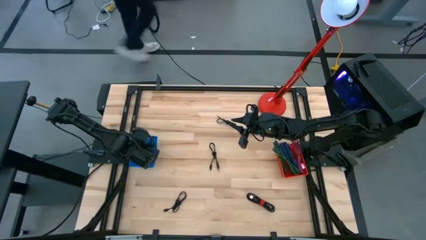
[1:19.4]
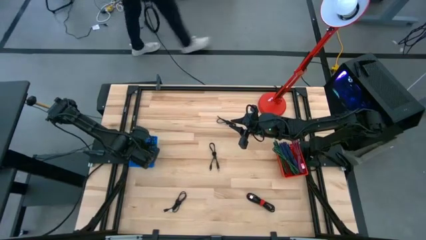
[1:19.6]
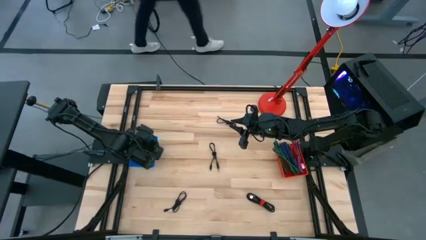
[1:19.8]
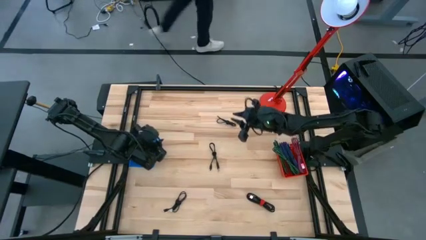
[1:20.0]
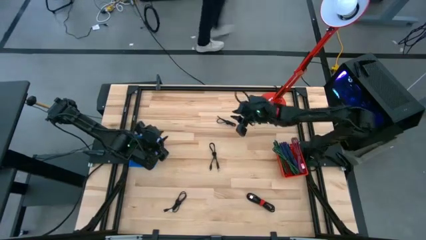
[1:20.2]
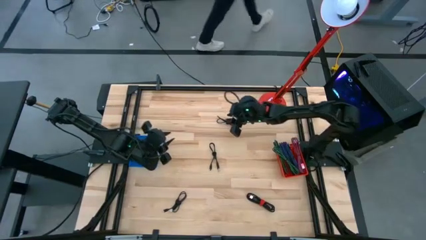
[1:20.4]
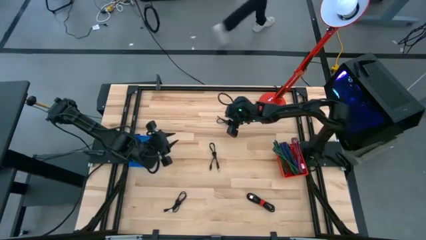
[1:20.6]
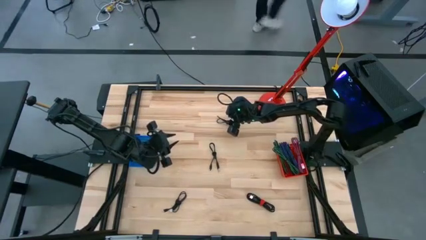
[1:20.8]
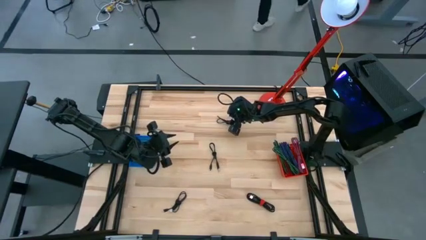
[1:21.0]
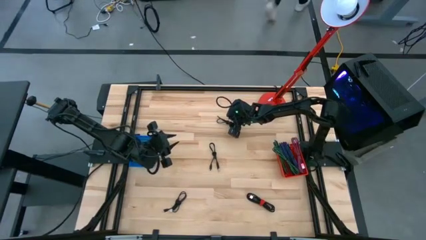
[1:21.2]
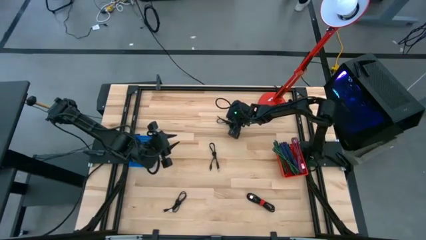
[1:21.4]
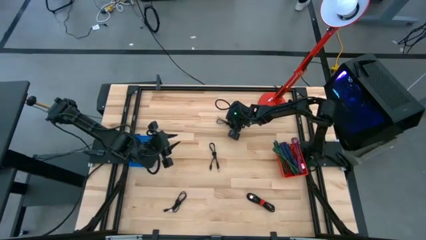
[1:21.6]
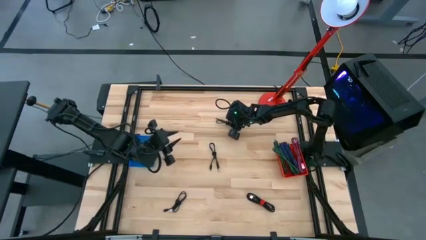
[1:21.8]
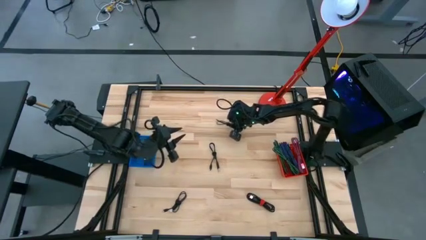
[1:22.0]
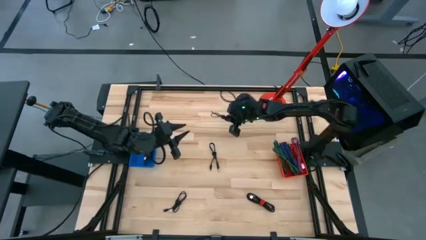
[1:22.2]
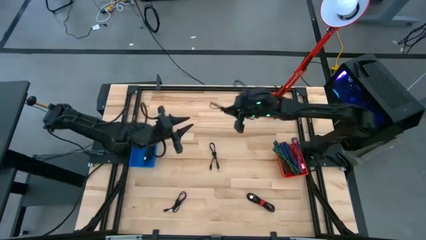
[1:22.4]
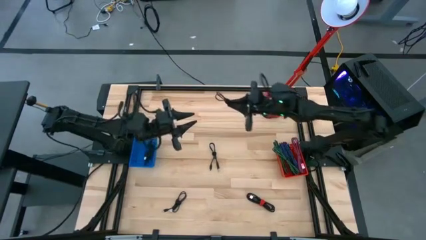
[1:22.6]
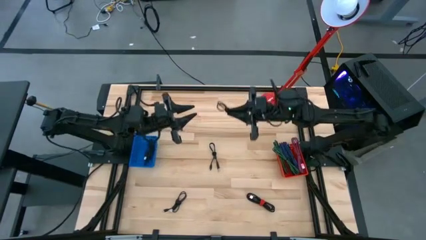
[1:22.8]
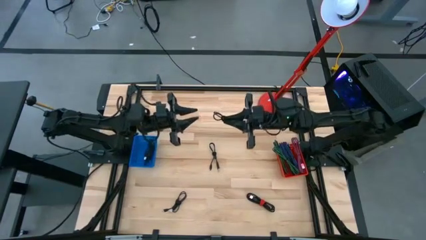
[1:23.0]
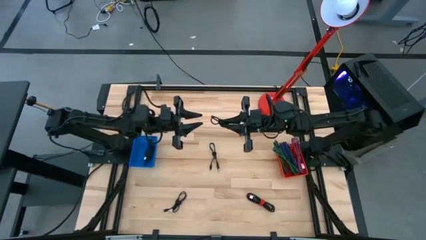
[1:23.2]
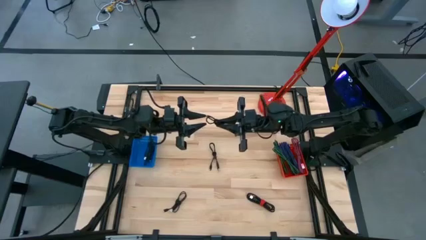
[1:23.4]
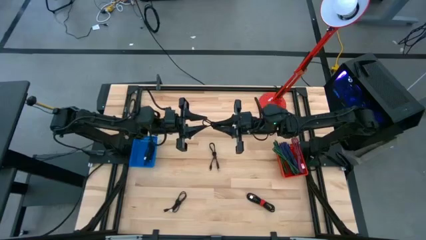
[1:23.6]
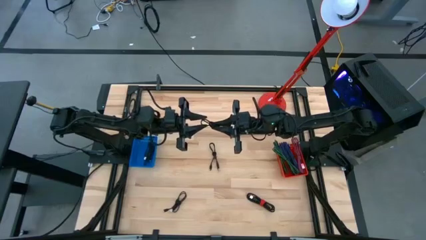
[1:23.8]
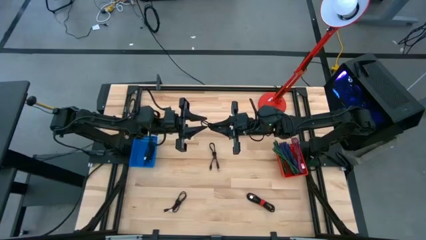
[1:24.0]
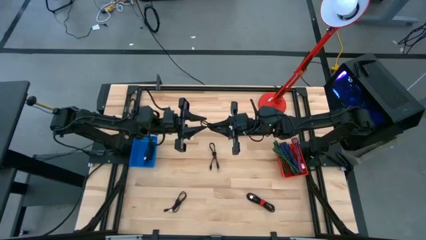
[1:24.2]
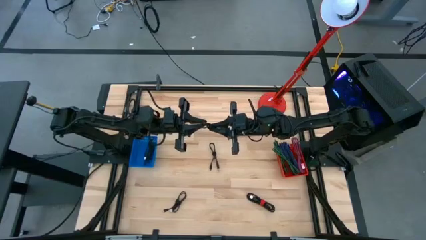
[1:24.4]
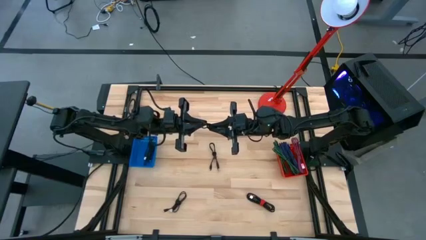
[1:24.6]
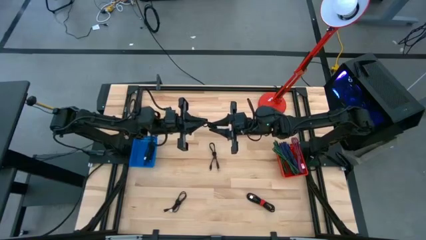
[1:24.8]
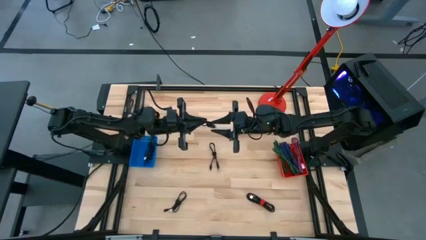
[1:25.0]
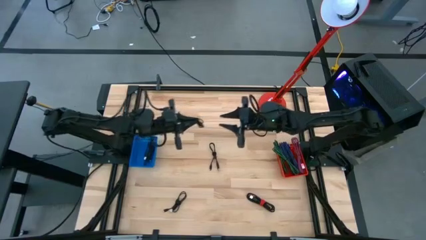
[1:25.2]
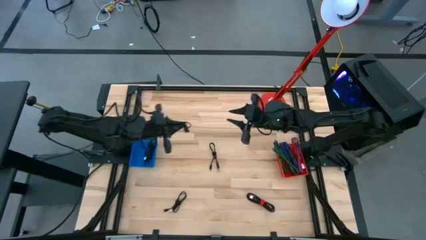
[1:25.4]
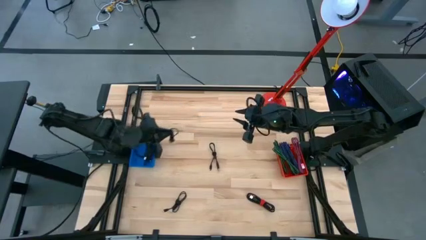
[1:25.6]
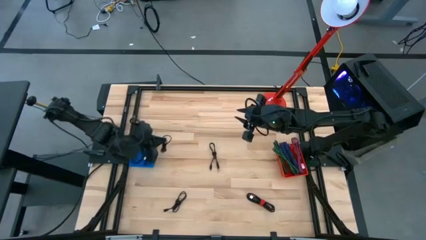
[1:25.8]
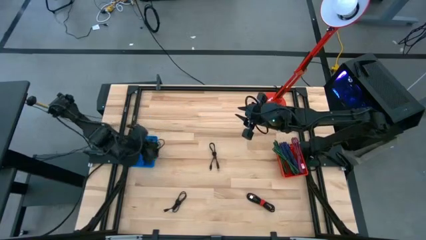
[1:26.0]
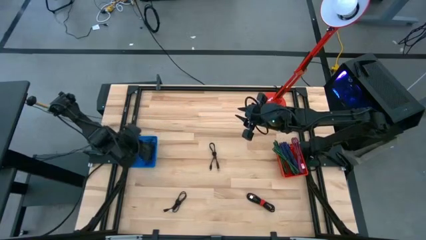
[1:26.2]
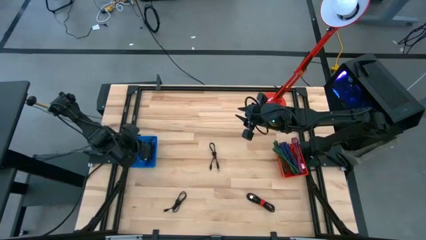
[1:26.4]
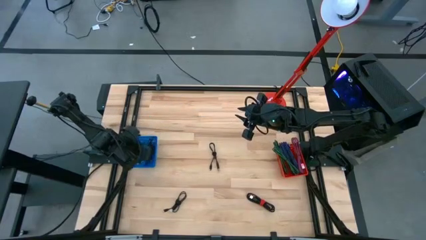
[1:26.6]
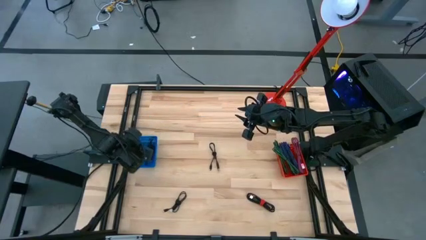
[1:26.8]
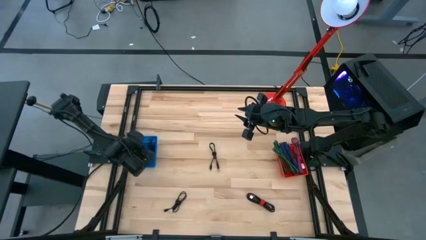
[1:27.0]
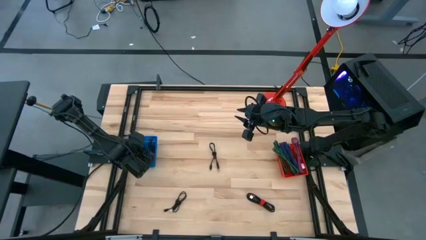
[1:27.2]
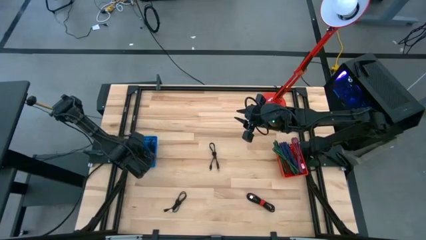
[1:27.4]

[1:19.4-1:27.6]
Task: Pick & Place USB Port
Put the black charger cable into the blue basket

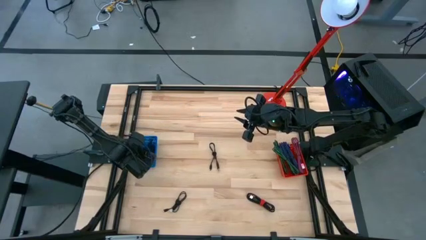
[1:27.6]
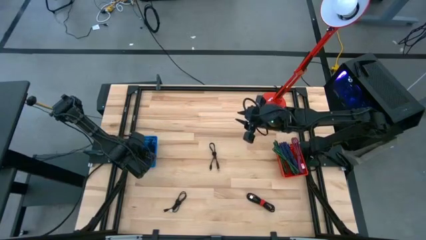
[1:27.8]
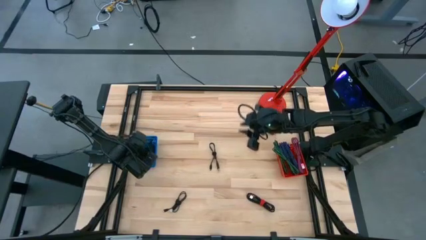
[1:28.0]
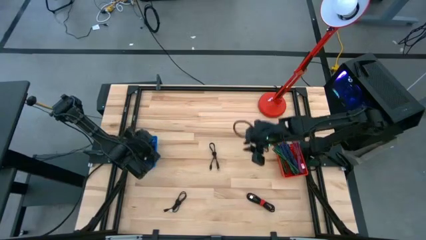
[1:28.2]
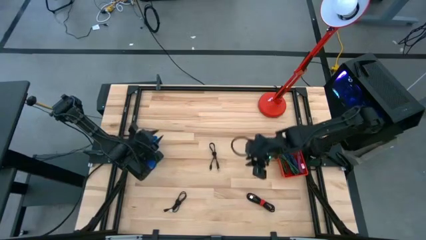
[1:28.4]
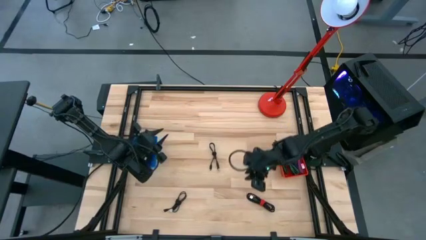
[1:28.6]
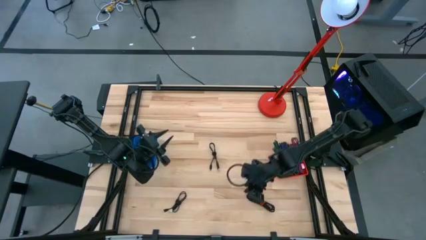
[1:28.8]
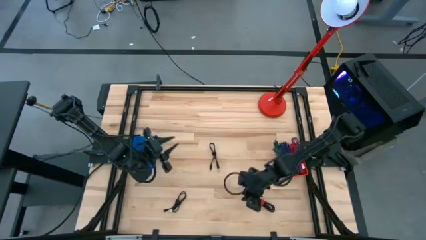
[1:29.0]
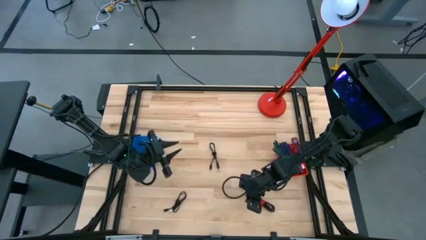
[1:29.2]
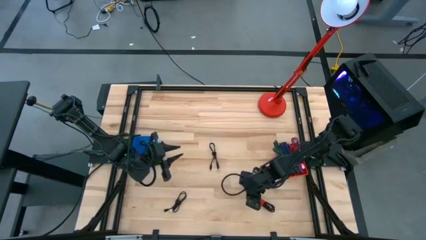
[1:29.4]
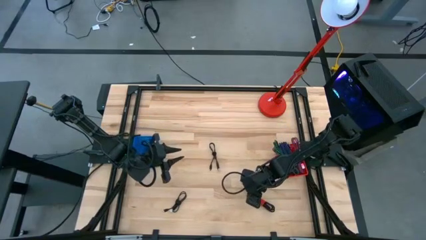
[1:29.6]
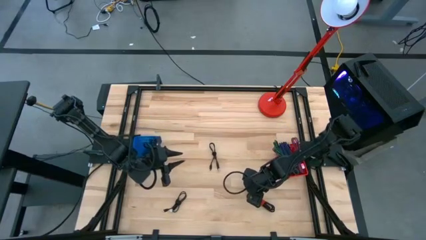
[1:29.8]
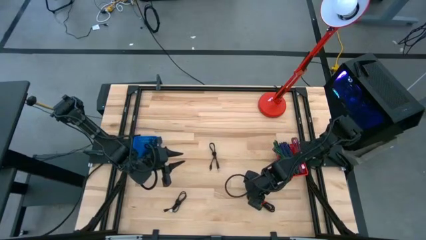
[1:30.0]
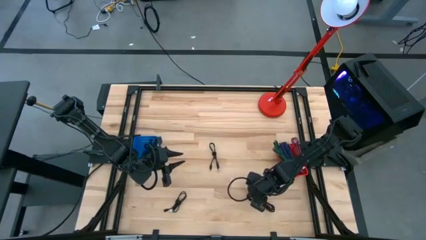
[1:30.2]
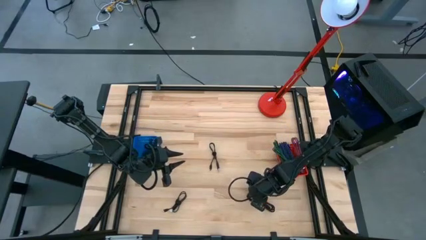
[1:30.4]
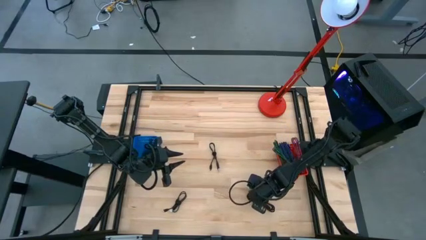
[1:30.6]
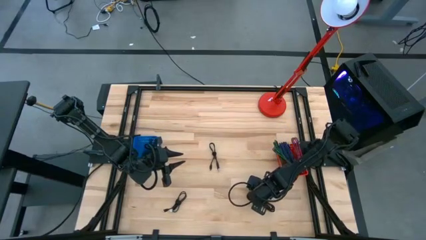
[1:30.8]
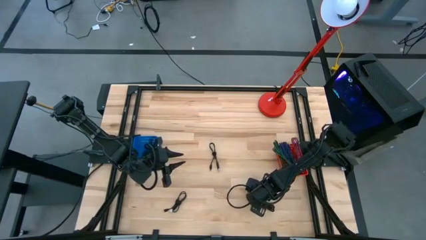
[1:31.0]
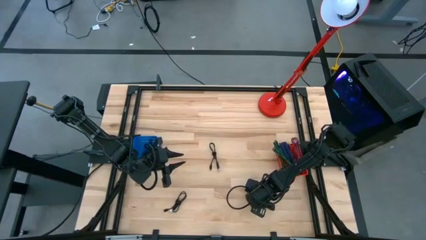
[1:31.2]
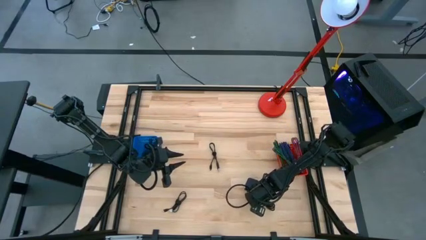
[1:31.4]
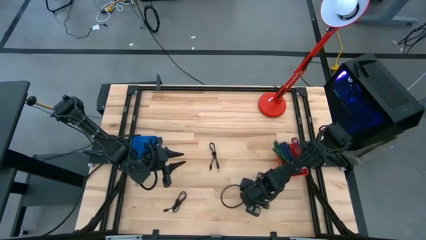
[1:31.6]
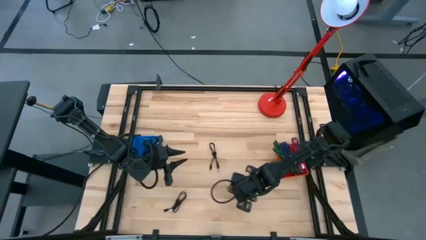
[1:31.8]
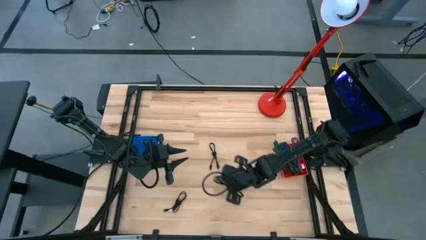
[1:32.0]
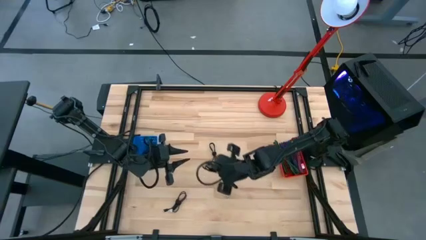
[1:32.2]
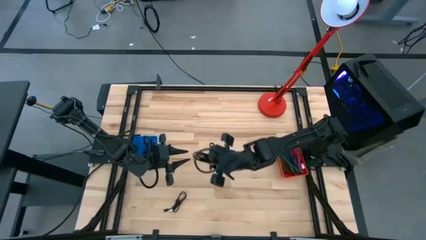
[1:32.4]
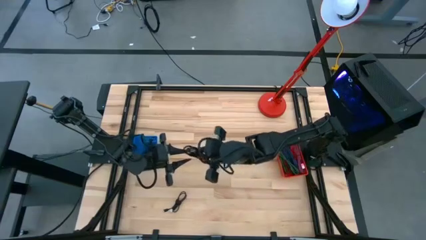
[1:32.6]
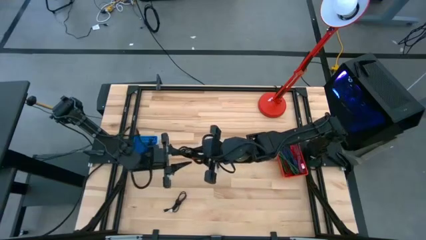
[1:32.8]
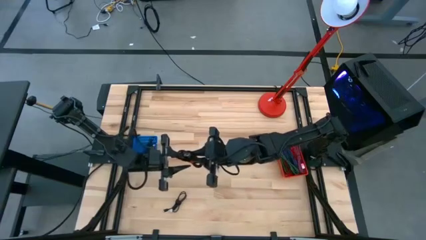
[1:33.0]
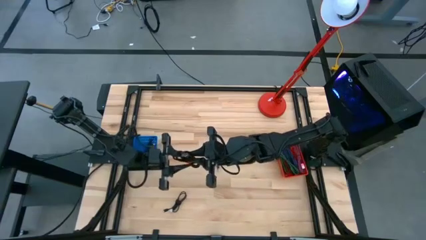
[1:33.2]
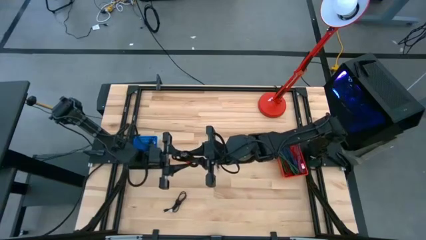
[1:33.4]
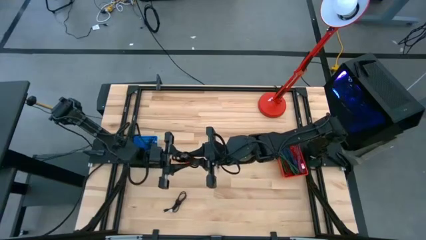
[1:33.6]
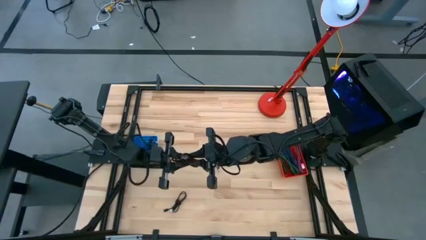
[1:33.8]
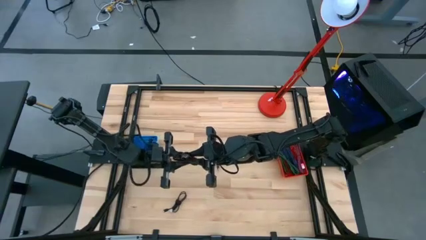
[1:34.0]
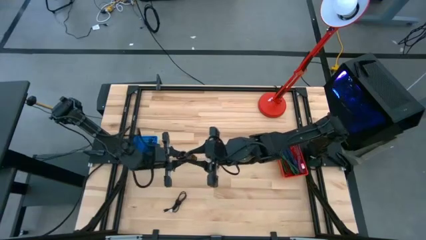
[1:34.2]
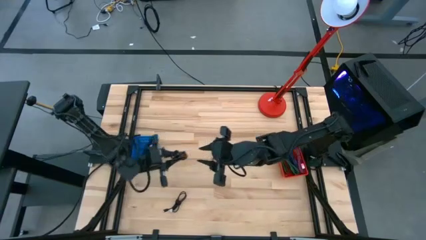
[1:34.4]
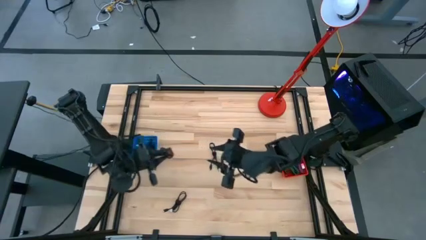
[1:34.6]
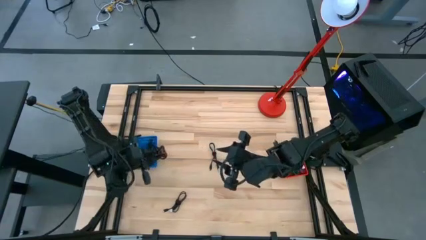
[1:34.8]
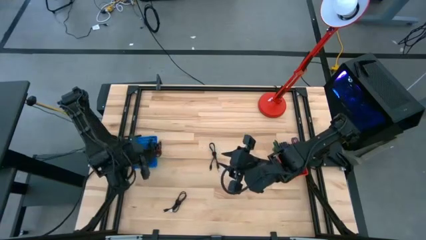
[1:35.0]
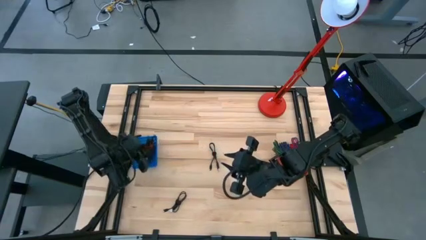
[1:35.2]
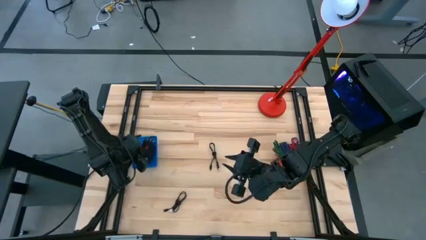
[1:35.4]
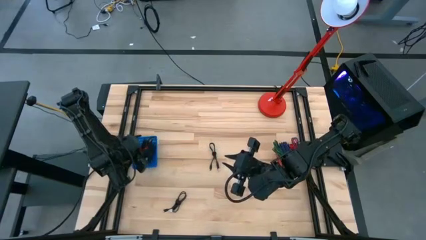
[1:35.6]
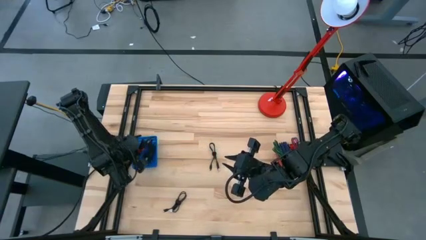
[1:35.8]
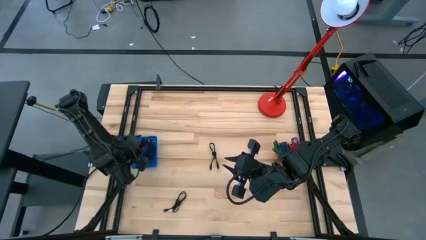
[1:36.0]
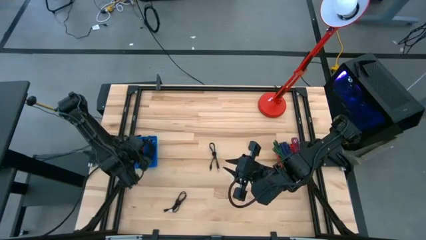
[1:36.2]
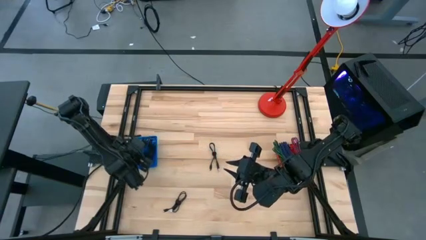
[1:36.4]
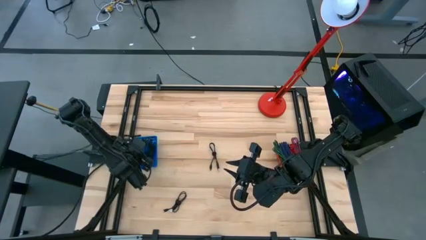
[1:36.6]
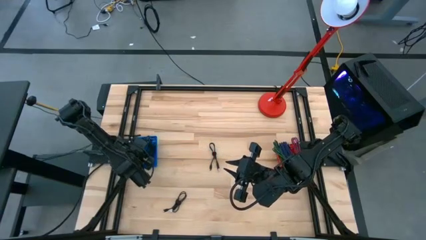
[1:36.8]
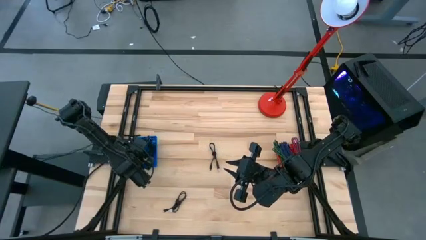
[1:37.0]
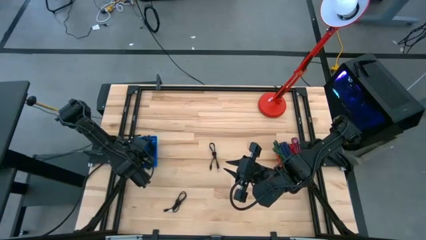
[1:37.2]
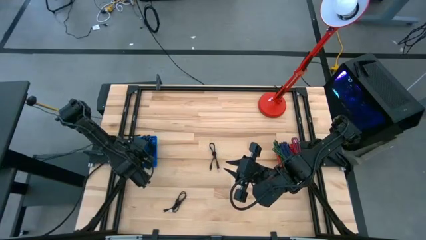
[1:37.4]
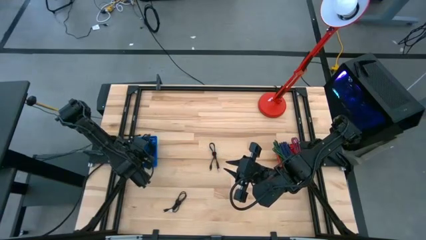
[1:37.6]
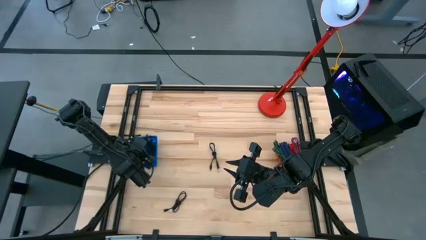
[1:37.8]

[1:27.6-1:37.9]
Put the black charger cable into the blue basket
